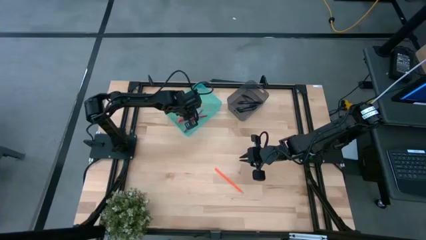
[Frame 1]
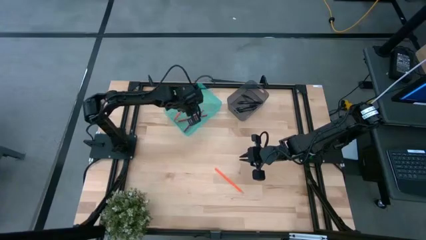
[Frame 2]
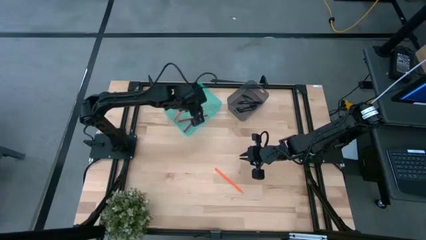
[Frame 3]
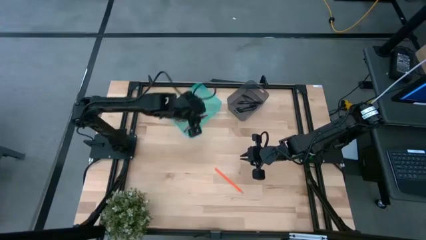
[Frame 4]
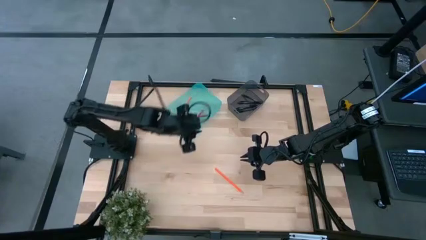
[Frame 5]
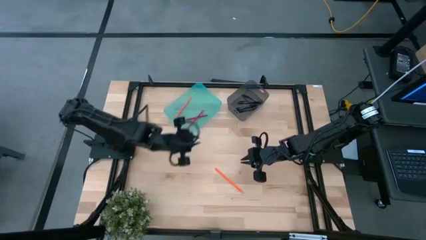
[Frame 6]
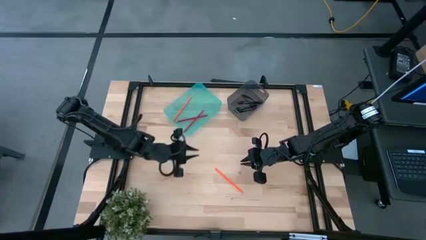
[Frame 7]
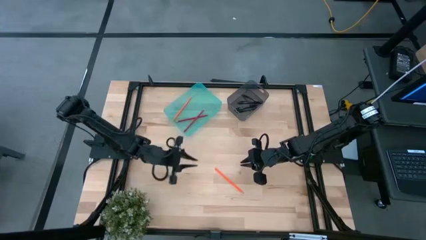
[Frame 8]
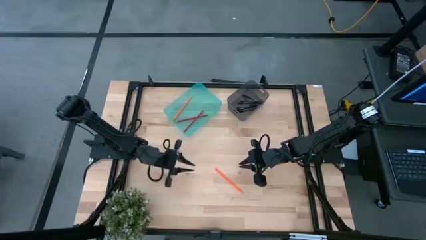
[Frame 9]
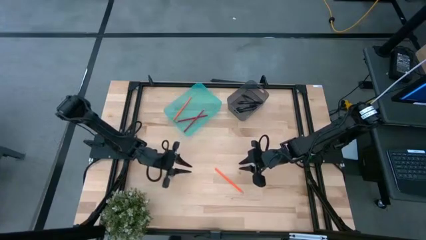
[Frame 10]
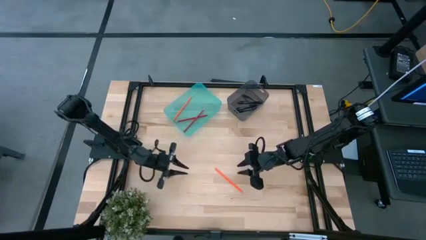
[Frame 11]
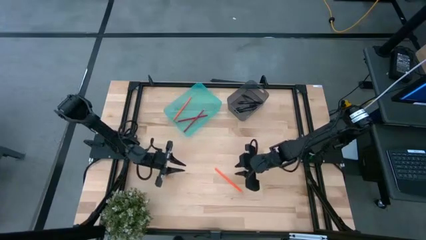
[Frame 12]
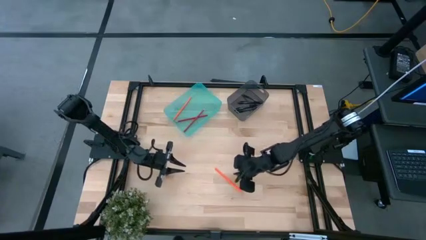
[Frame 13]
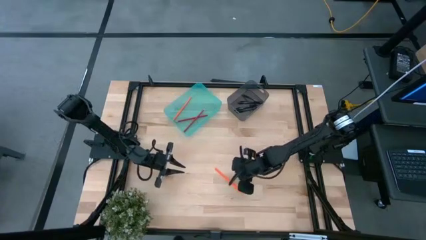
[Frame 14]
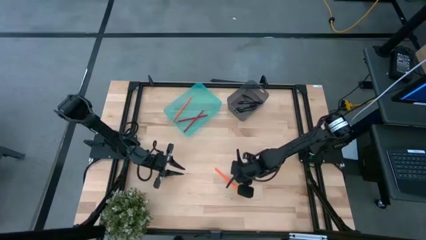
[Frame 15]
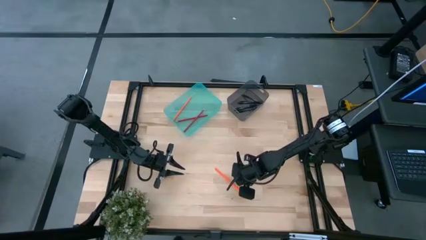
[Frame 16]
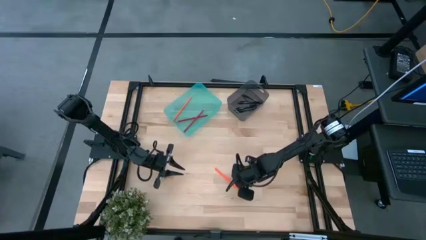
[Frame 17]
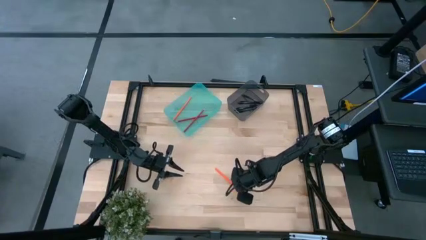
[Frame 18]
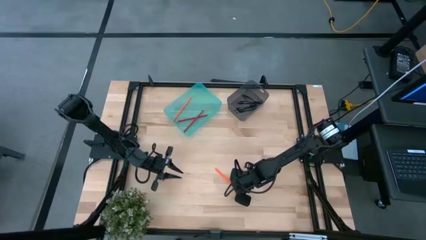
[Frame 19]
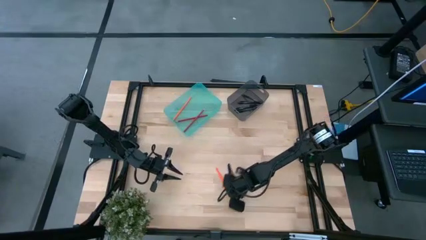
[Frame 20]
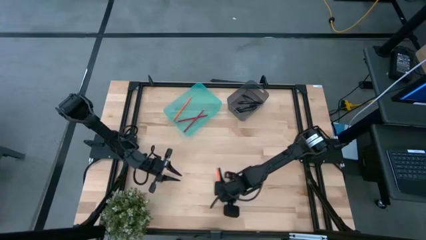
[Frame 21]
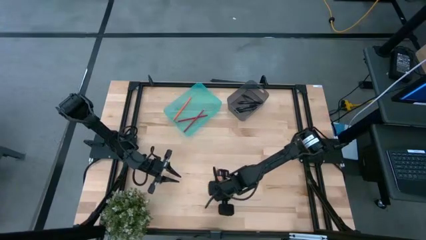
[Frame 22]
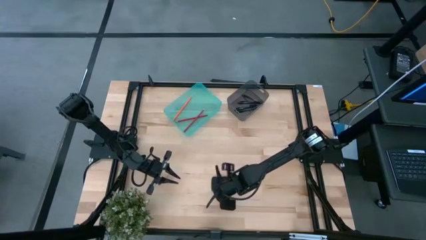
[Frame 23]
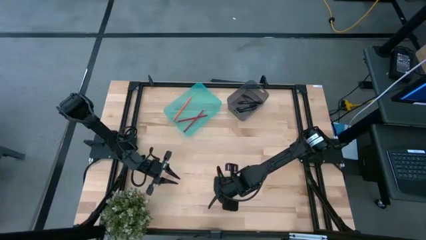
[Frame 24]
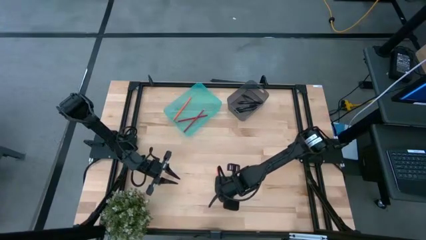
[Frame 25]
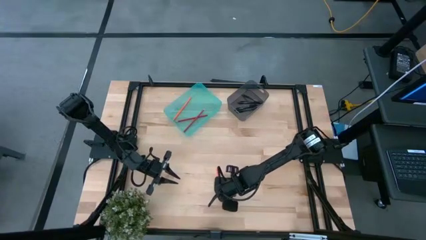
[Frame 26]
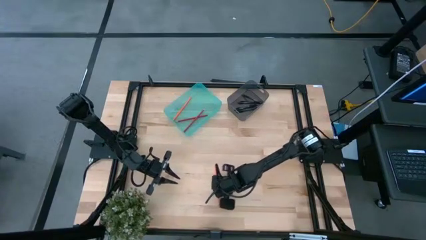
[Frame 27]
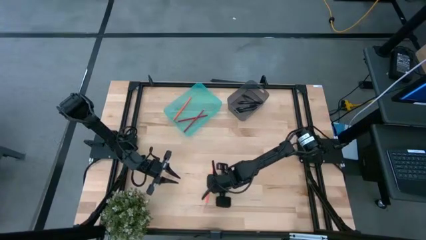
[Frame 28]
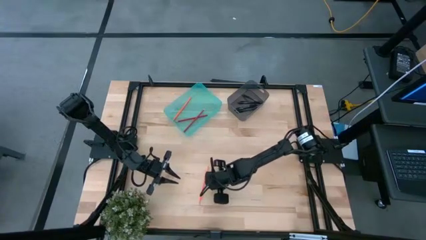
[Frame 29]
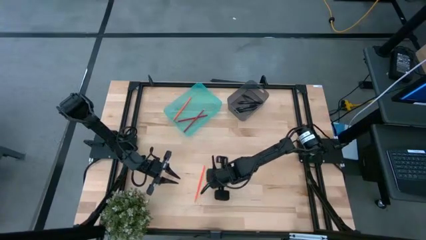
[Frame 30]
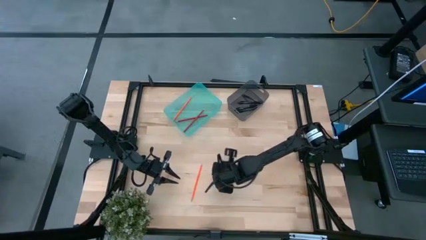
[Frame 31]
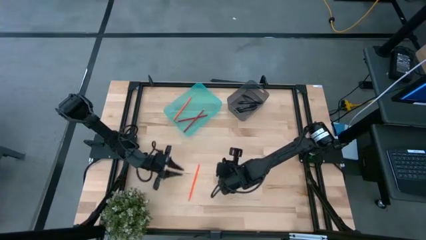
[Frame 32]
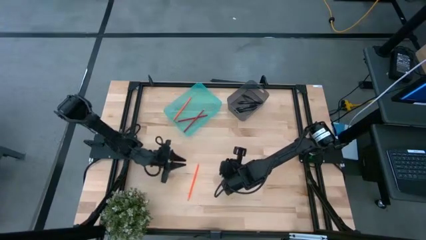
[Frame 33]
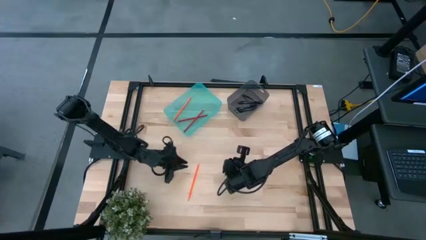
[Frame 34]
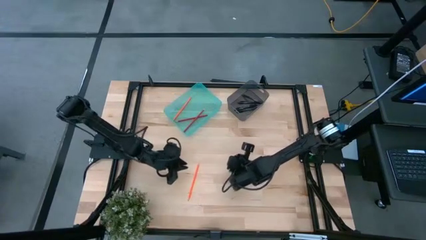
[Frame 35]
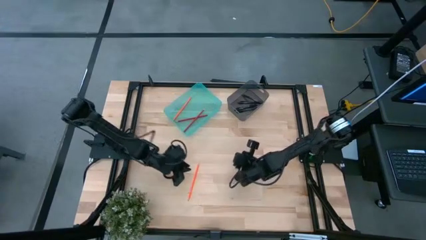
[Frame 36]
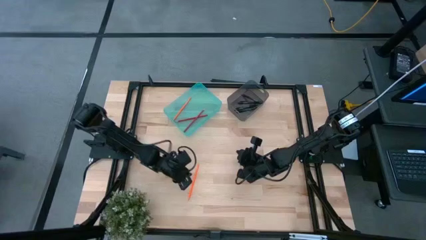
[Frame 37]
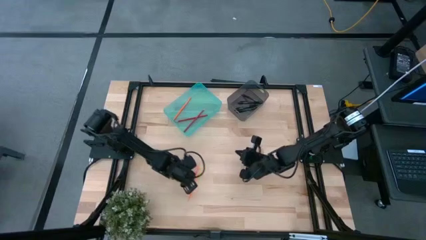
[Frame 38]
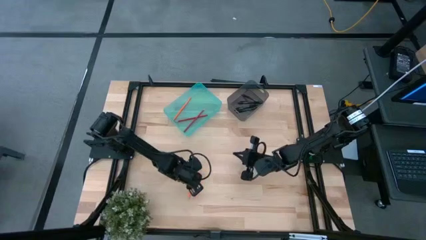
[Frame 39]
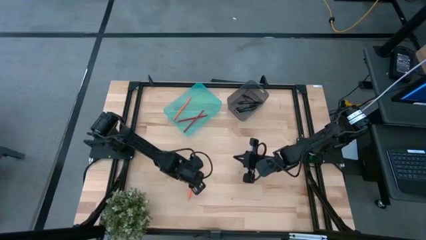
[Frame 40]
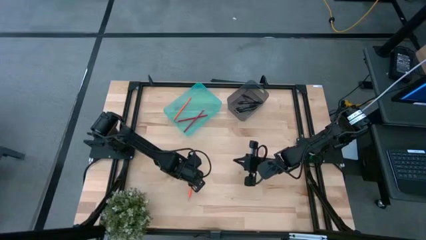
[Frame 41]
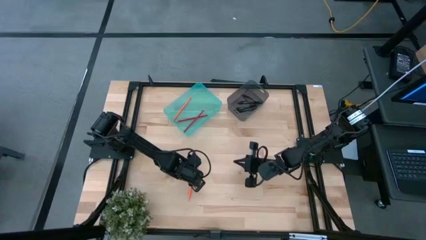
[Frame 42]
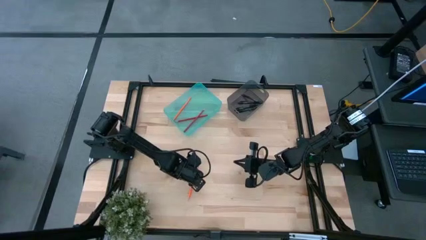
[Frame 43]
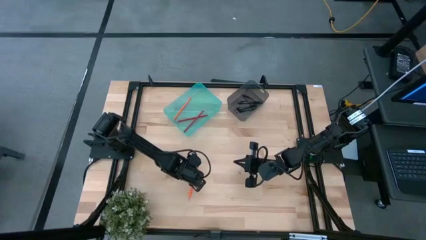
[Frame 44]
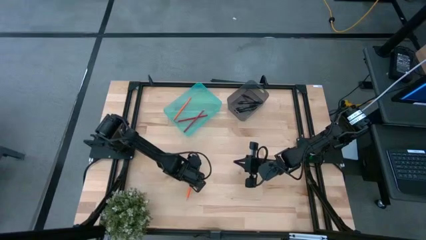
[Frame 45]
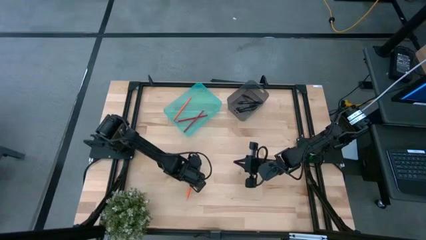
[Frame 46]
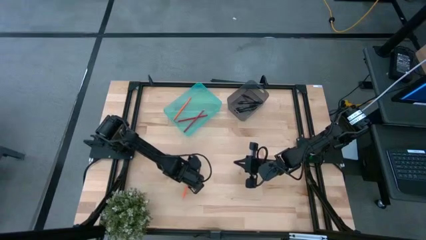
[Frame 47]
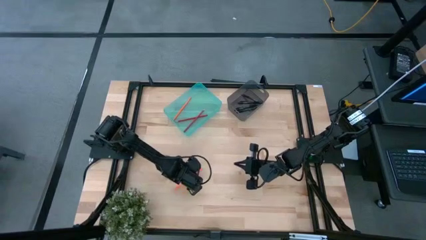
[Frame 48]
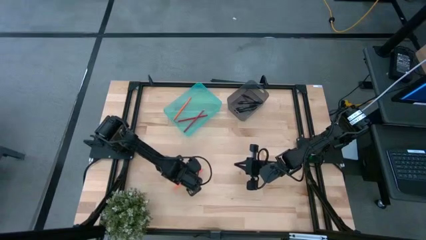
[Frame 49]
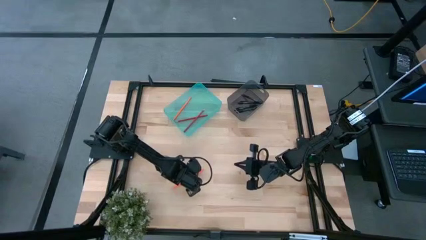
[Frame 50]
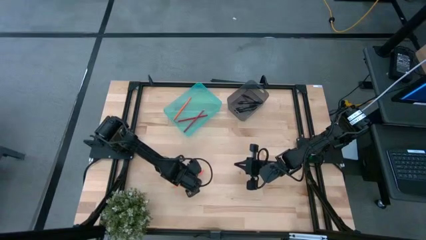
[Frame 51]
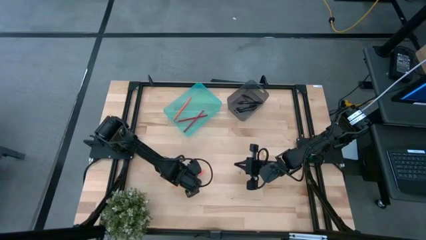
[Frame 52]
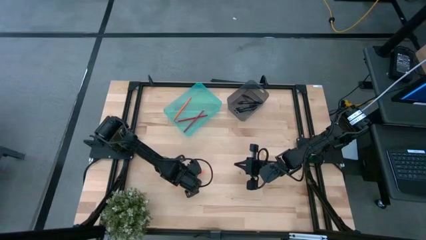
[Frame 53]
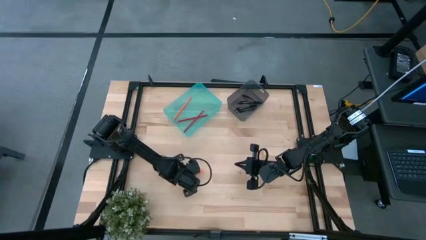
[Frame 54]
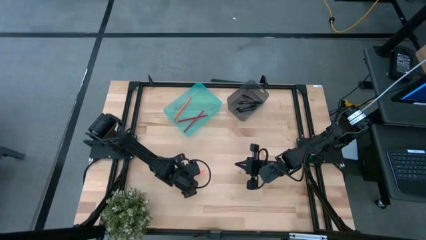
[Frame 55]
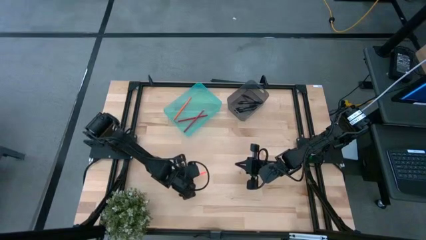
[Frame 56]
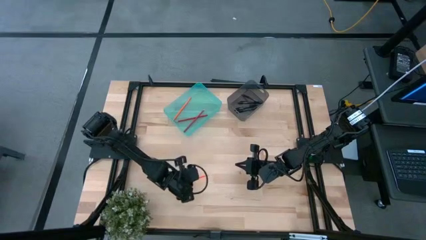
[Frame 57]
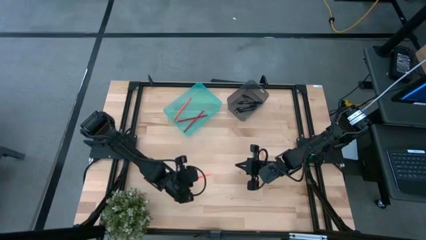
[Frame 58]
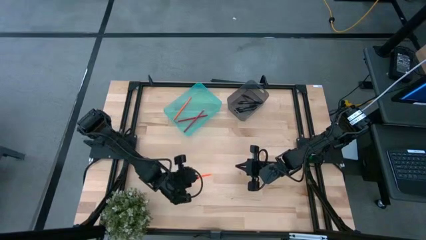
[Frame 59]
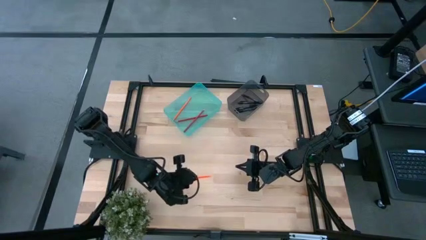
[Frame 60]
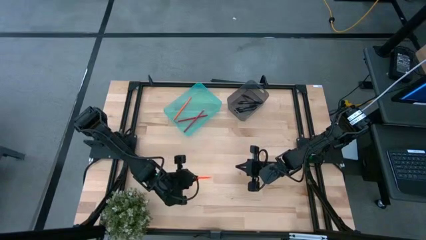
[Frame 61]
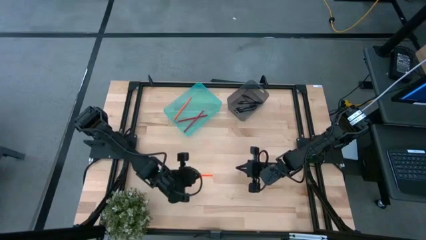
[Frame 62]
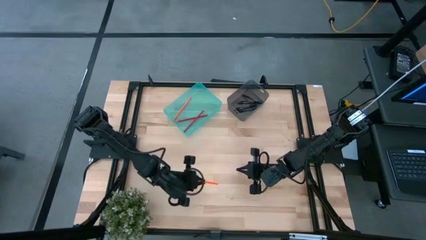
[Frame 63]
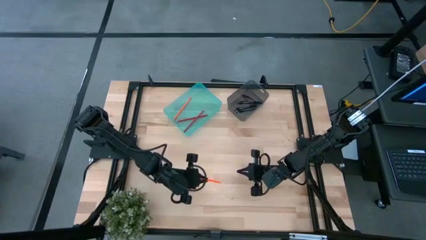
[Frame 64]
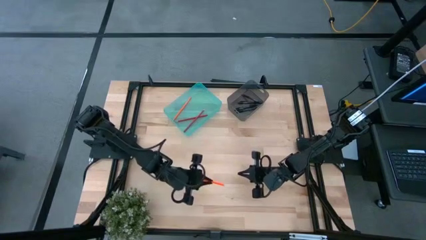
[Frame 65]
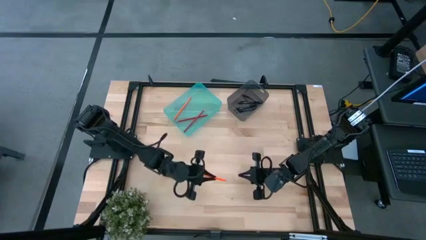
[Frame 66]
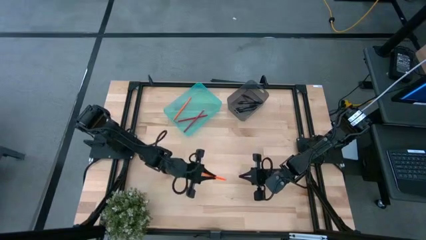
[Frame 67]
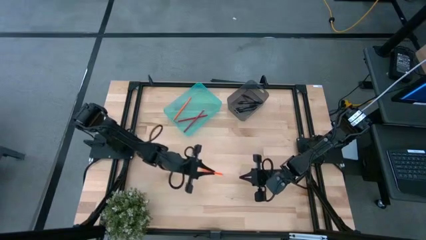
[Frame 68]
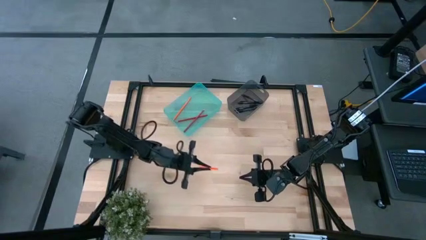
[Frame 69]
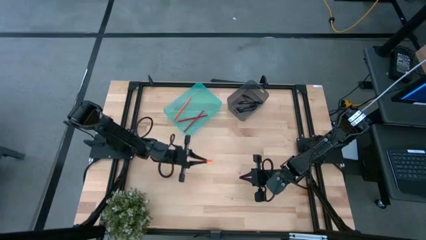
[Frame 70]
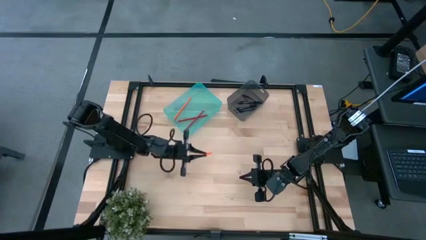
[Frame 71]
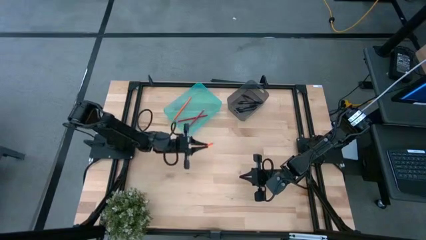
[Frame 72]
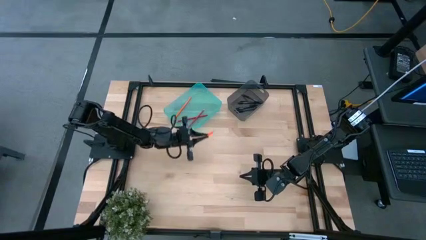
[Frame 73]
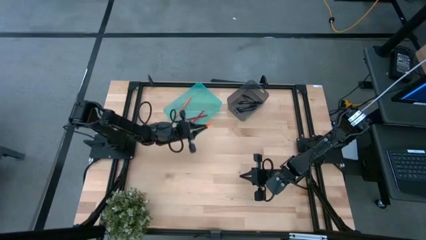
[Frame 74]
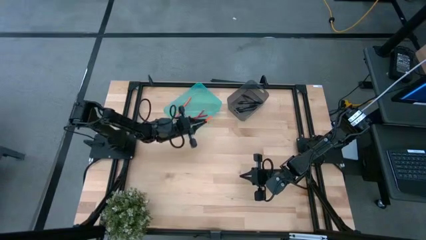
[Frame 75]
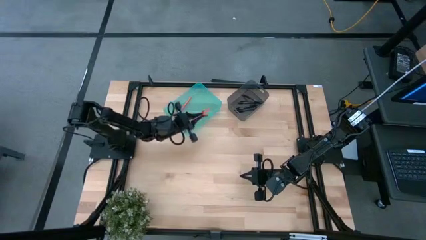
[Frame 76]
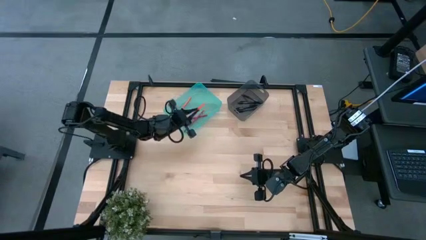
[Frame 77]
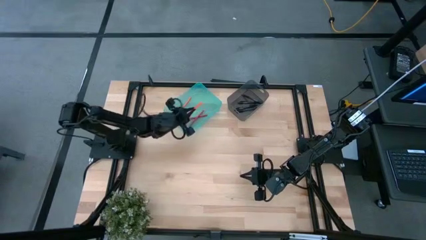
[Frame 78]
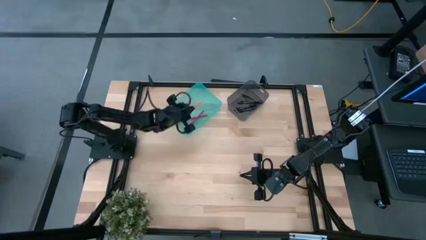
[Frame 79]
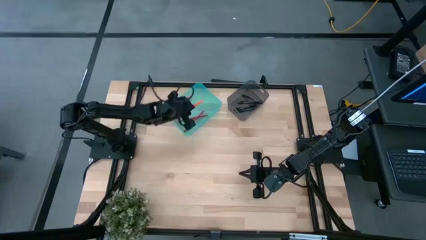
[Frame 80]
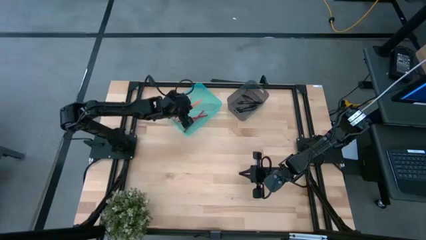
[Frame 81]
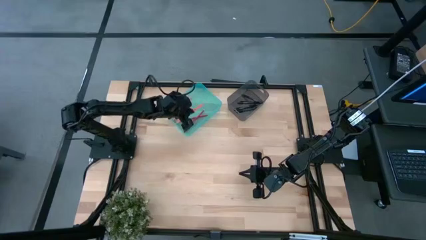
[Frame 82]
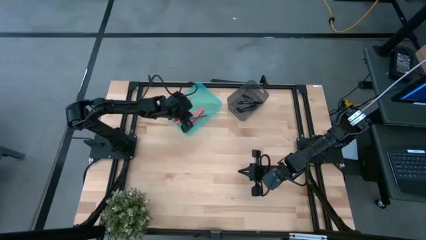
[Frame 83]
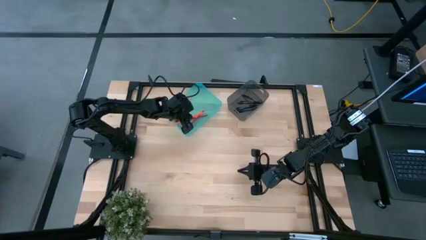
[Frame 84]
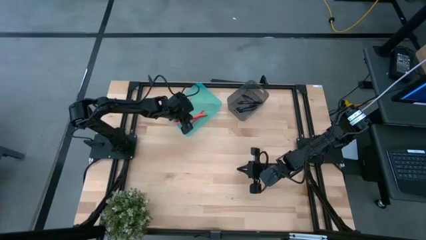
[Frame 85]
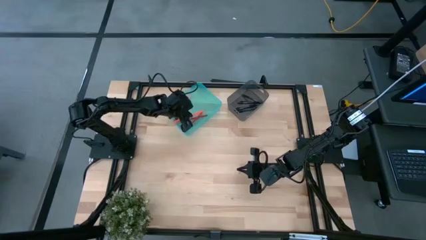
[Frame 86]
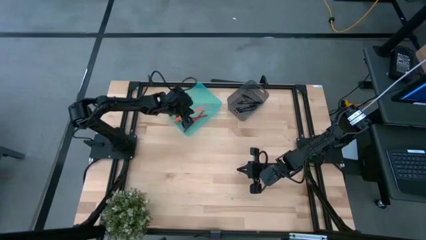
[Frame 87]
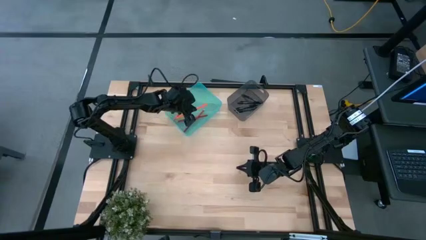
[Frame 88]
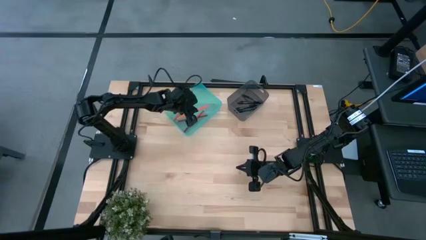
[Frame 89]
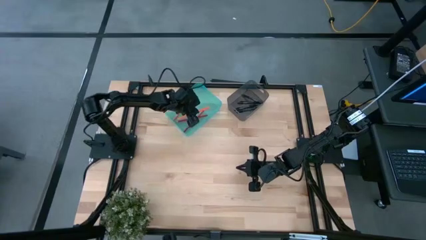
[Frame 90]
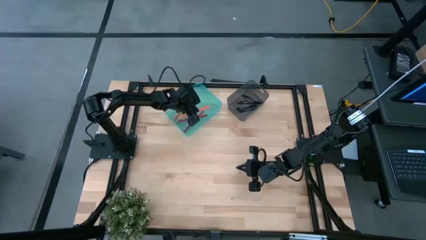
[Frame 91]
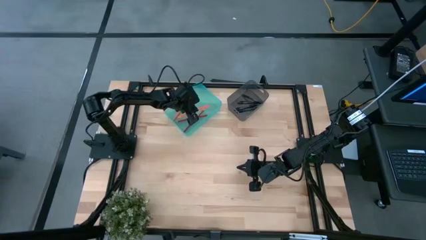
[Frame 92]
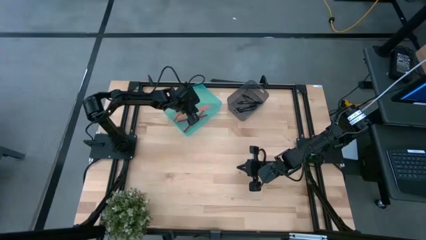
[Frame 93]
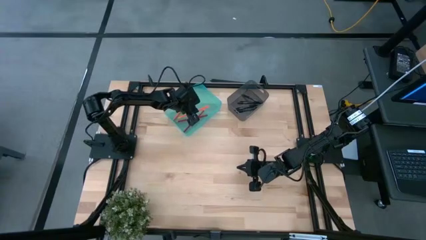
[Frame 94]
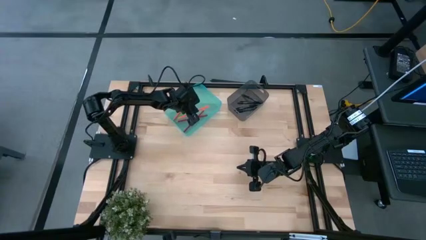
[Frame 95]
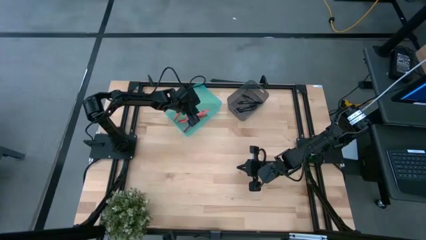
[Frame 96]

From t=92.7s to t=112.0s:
Task: Sort pens & pencils
Put the orange pencil into the green bin
